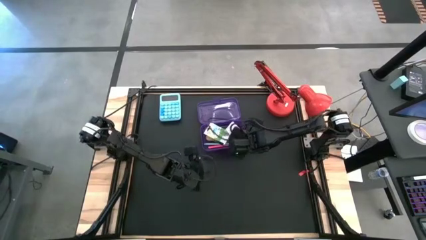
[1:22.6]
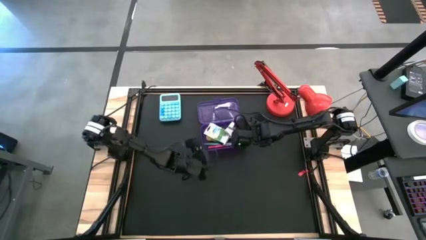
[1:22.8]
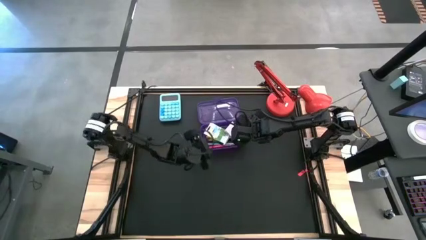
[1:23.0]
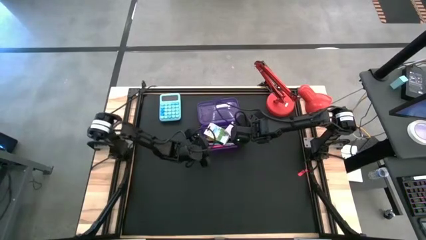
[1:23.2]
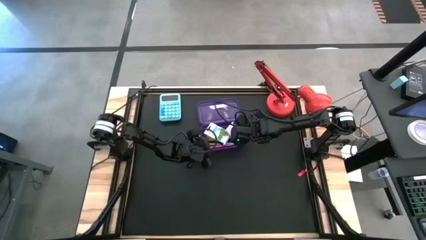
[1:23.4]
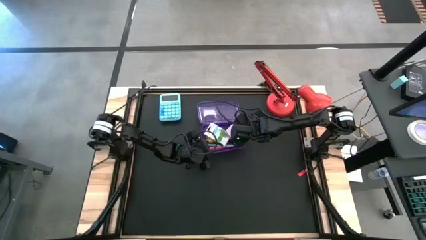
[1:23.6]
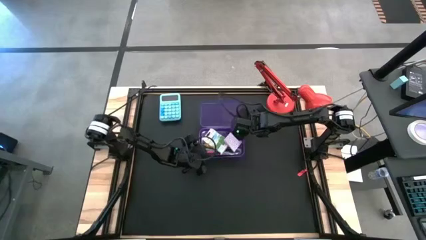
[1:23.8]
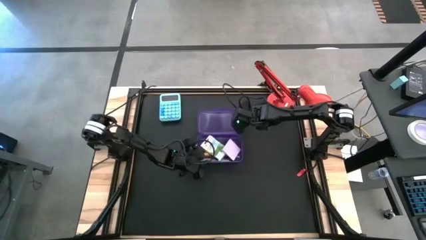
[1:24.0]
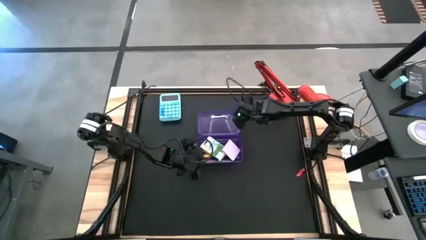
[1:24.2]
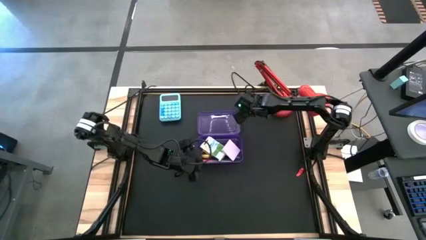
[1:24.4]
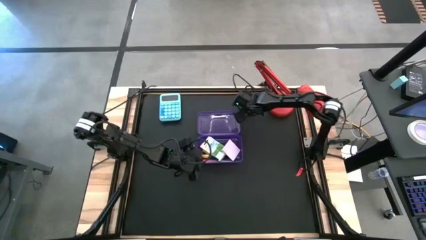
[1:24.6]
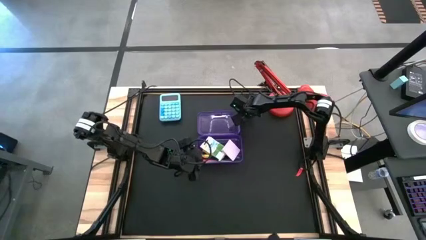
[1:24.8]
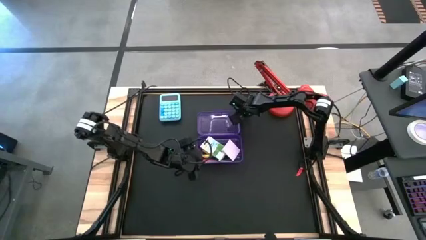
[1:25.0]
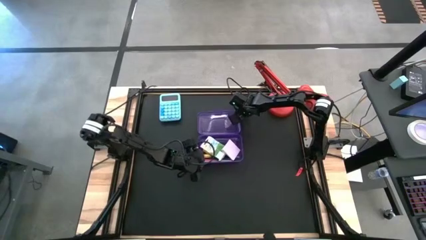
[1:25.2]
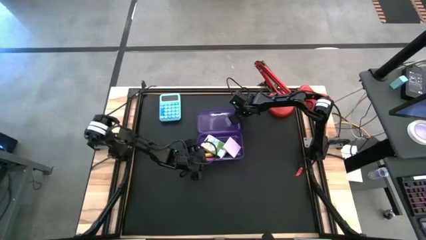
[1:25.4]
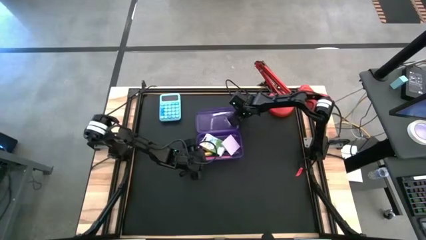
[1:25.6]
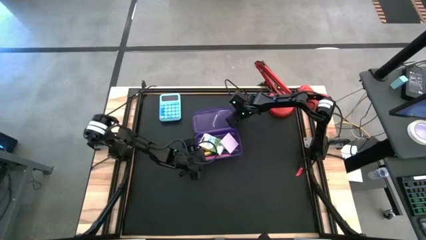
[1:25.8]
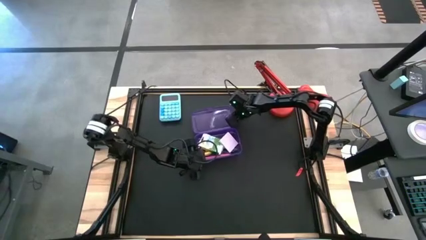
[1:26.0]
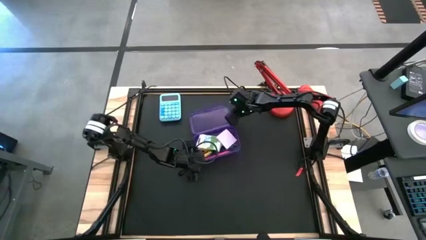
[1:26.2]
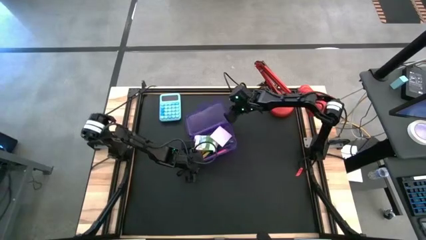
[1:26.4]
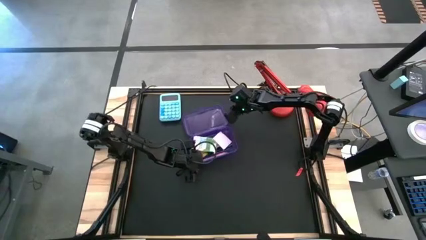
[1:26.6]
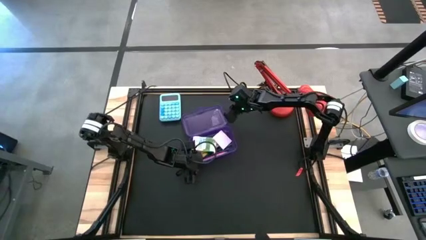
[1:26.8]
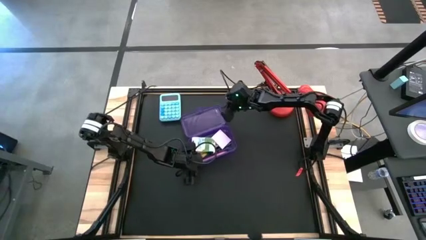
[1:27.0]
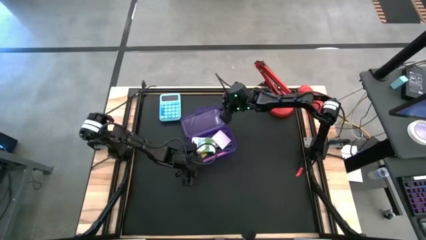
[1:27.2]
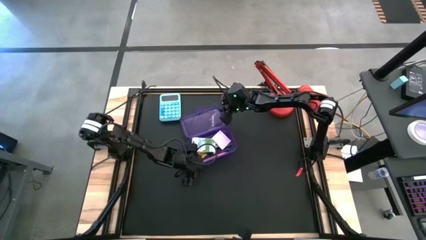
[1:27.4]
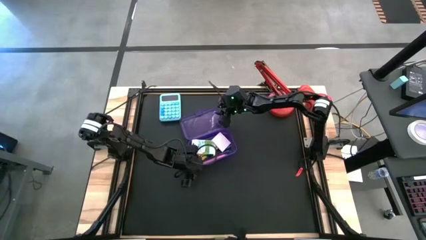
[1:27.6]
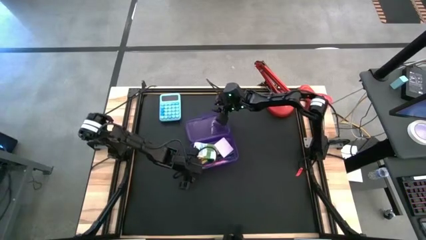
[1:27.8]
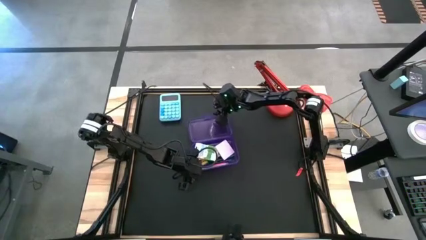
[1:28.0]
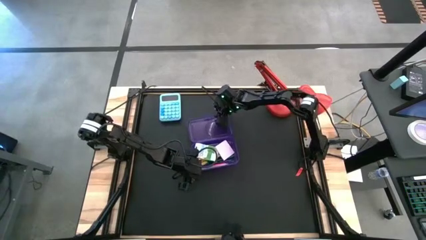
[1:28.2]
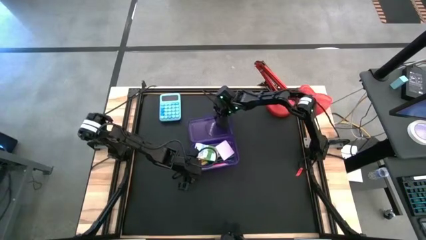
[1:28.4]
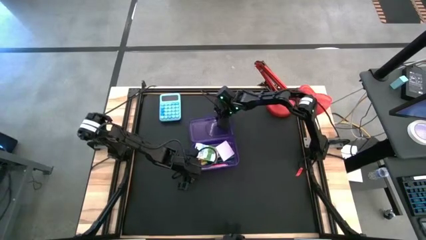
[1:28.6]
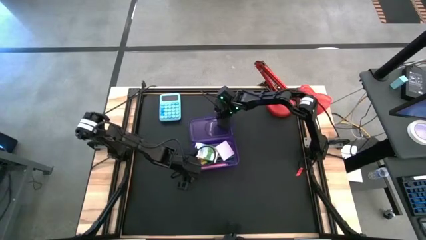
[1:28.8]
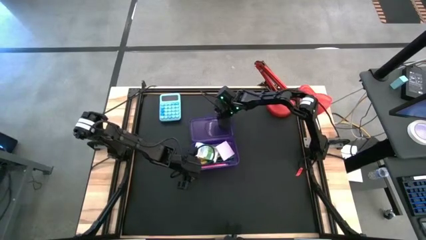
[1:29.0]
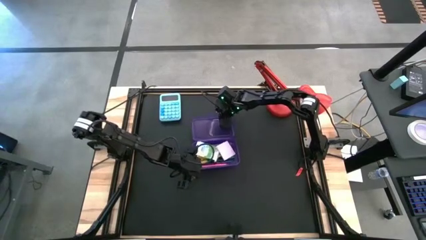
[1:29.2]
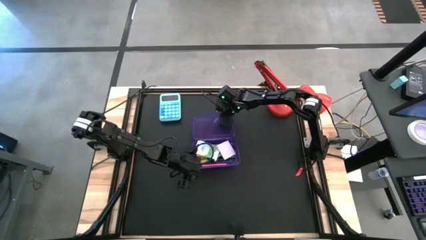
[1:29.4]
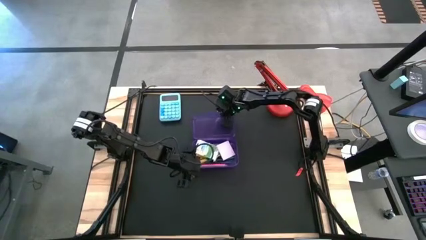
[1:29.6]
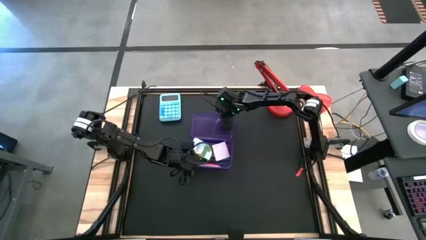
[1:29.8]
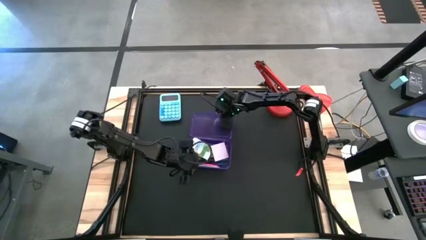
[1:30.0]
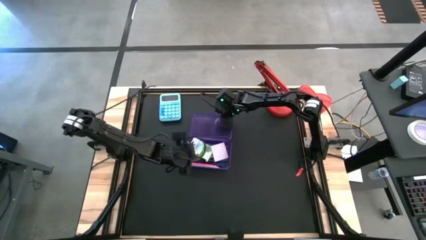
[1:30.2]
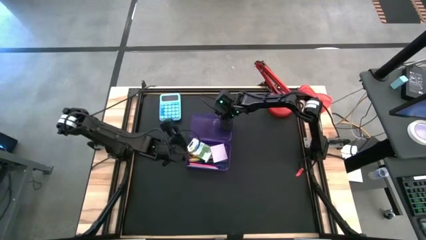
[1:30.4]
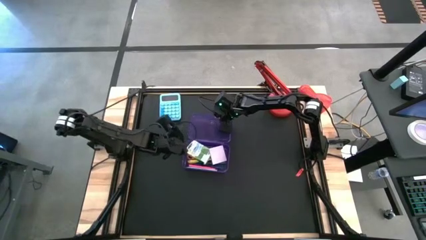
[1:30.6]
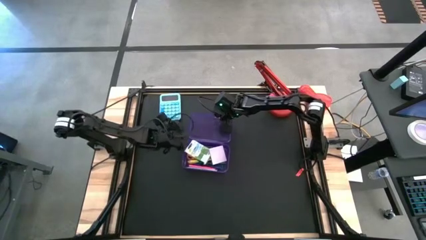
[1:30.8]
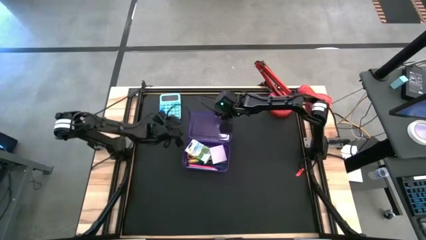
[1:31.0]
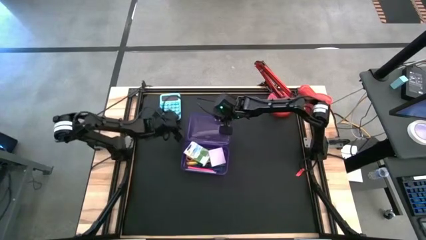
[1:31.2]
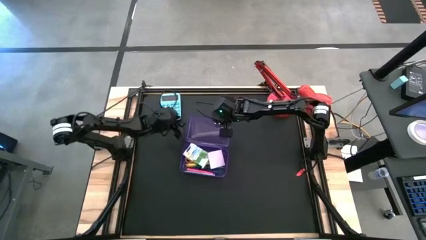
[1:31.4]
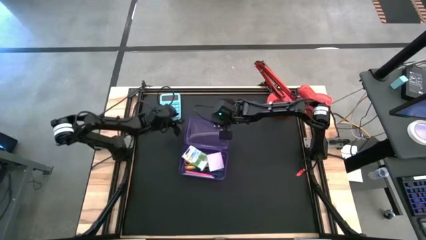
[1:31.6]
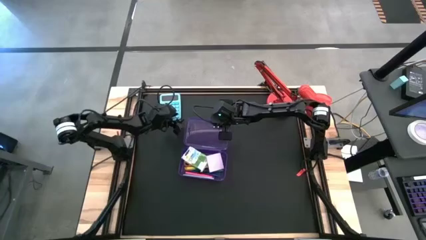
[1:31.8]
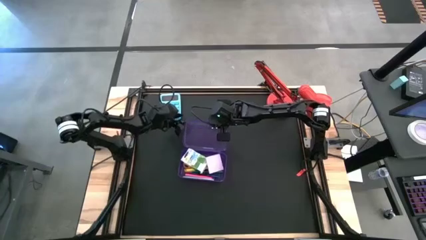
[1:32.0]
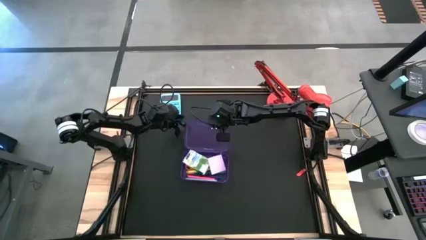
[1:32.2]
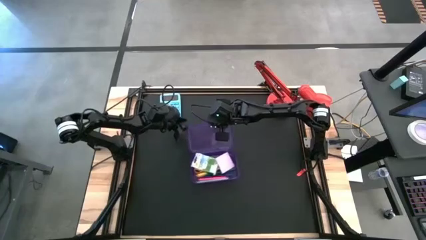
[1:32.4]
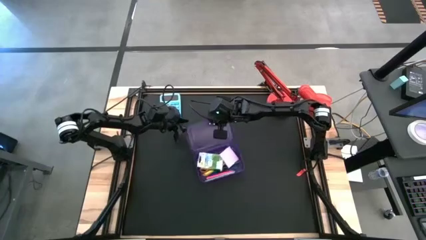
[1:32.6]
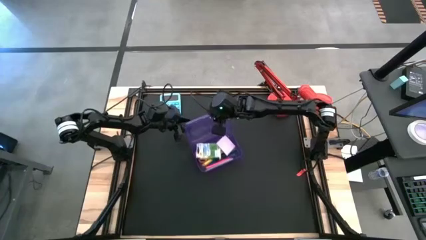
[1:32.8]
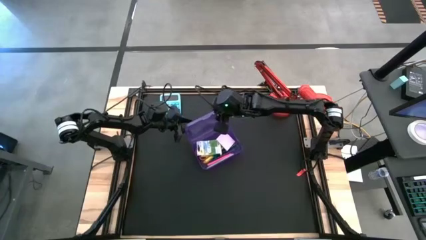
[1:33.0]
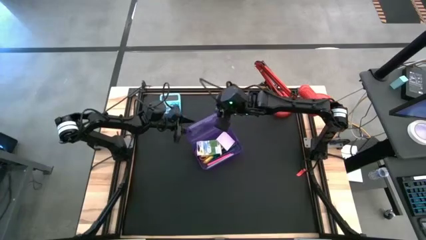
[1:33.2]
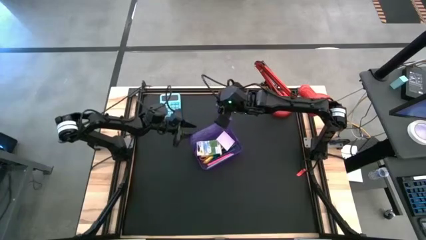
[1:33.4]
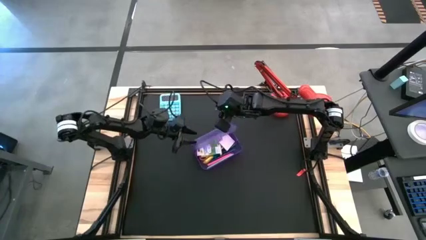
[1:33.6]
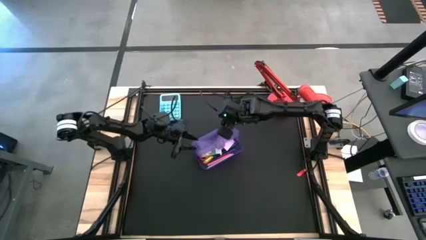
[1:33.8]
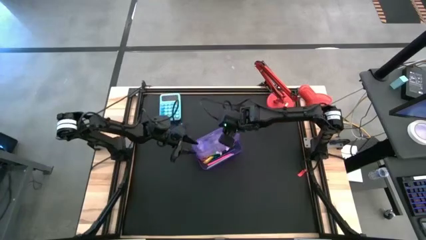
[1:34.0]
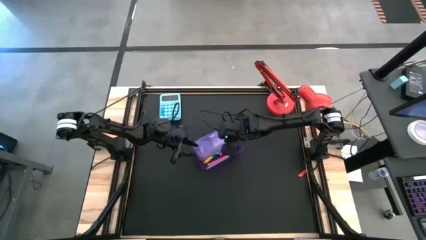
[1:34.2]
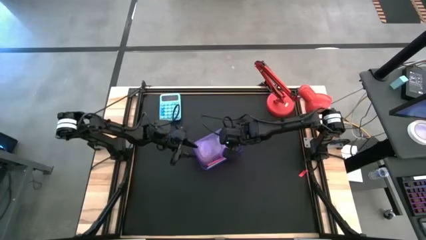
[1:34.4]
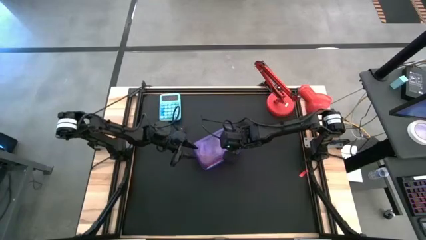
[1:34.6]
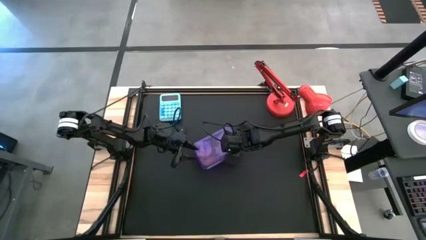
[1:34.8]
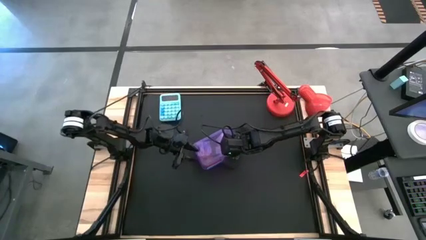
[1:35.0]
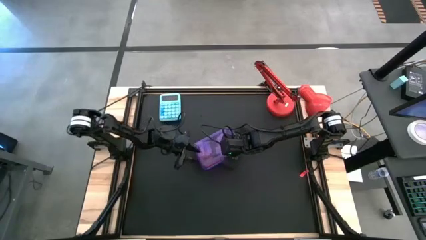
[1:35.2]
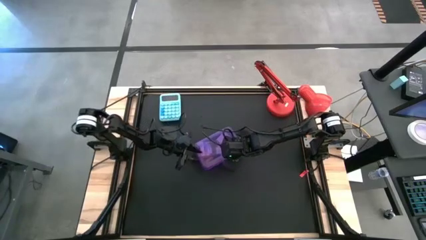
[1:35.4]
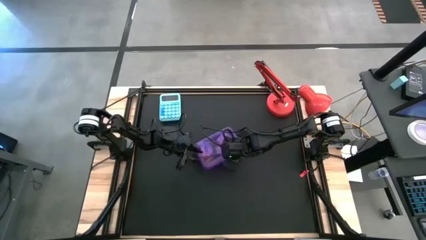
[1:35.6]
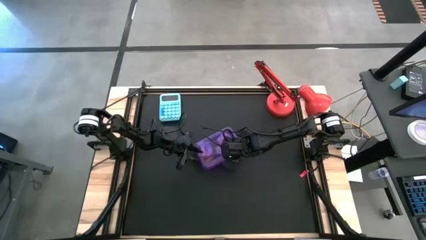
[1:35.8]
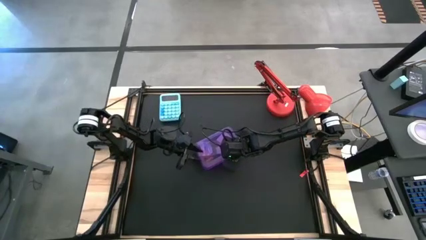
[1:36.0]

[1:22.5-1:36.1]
Task: Pack school essentials
Close the violet supply box
